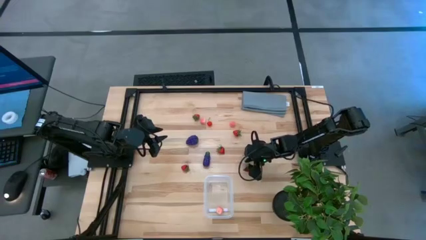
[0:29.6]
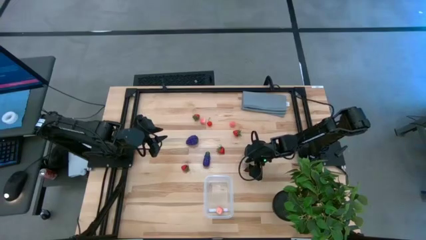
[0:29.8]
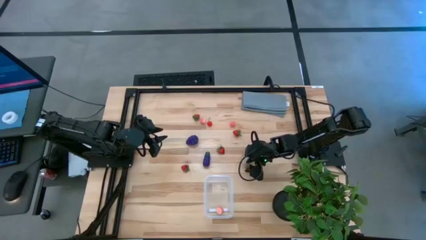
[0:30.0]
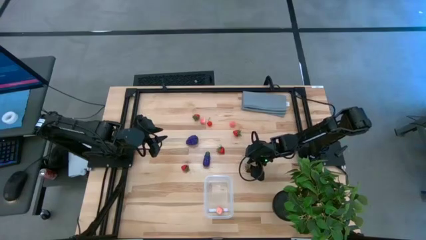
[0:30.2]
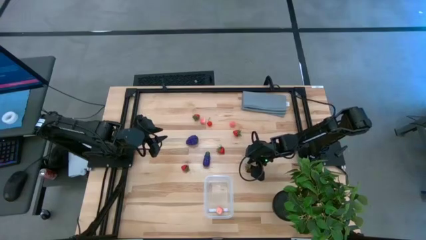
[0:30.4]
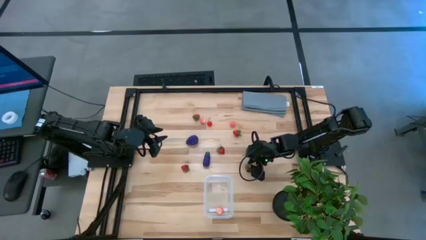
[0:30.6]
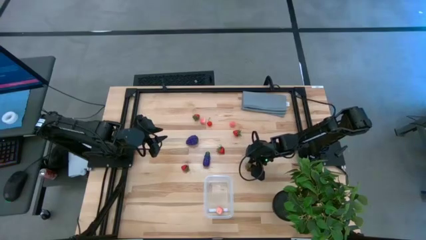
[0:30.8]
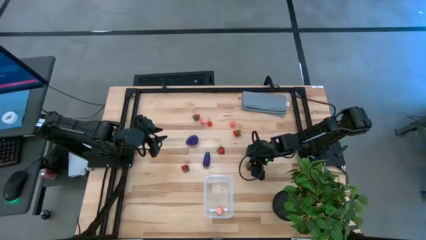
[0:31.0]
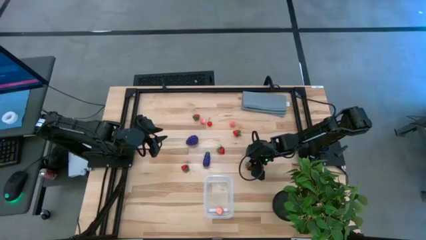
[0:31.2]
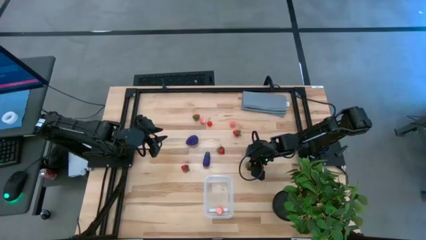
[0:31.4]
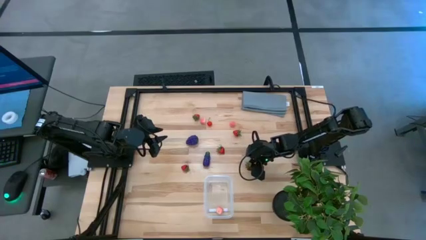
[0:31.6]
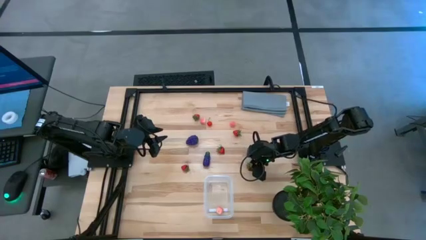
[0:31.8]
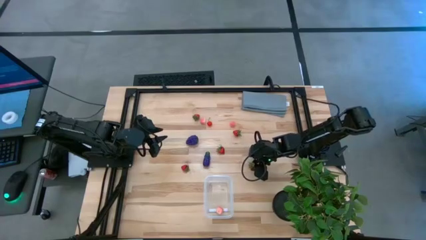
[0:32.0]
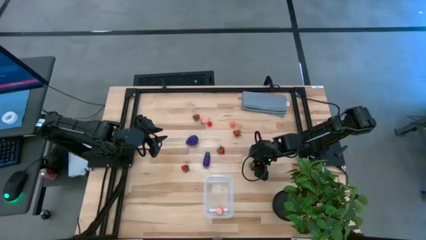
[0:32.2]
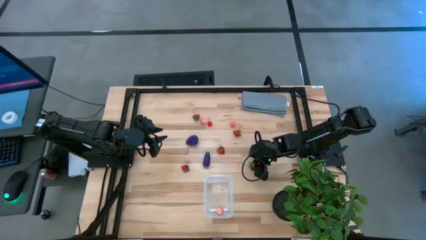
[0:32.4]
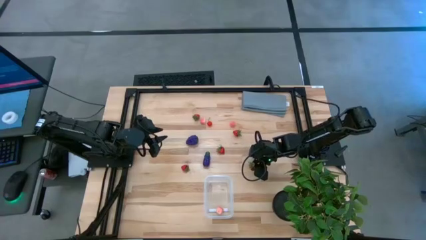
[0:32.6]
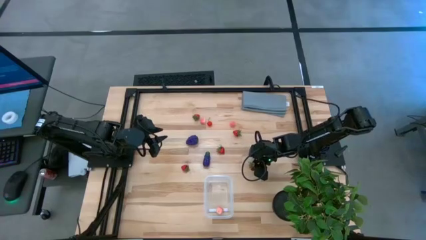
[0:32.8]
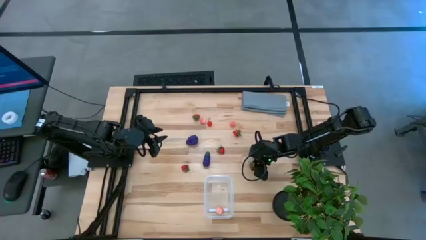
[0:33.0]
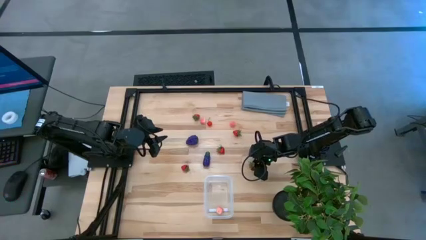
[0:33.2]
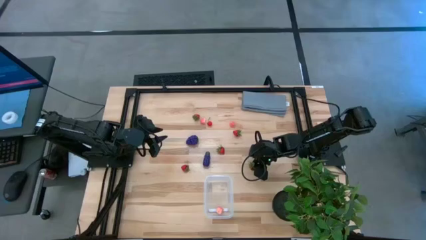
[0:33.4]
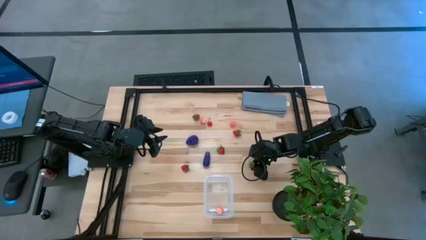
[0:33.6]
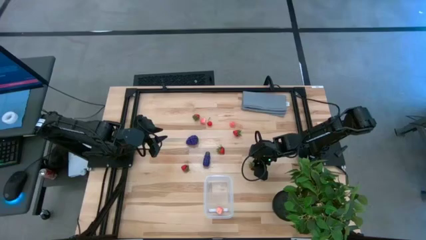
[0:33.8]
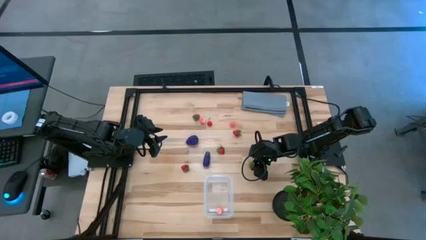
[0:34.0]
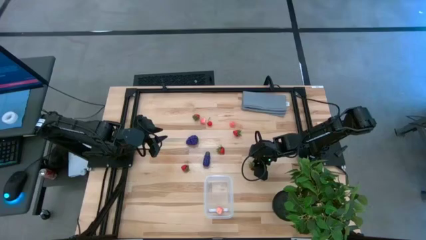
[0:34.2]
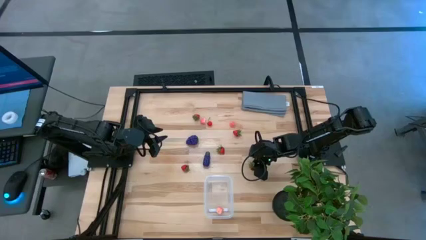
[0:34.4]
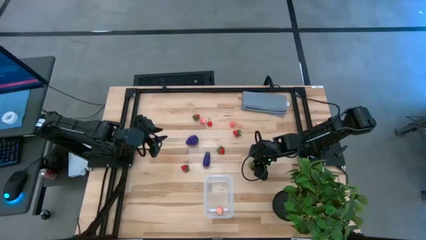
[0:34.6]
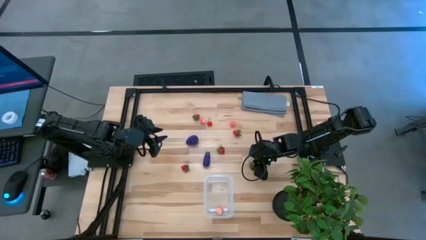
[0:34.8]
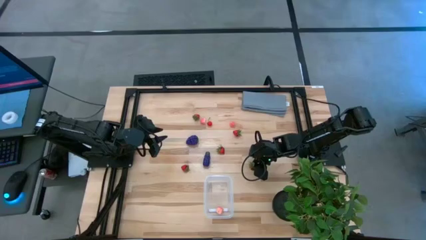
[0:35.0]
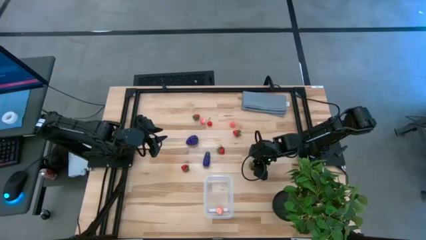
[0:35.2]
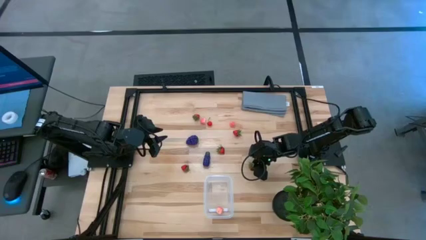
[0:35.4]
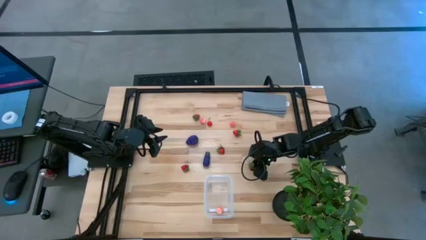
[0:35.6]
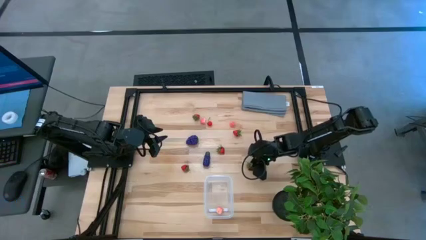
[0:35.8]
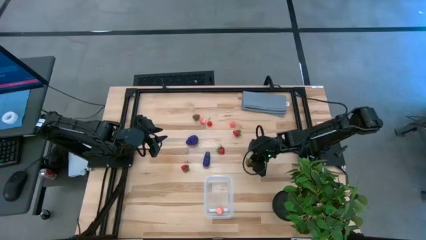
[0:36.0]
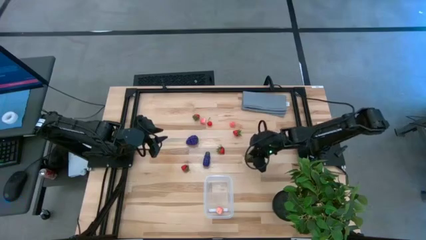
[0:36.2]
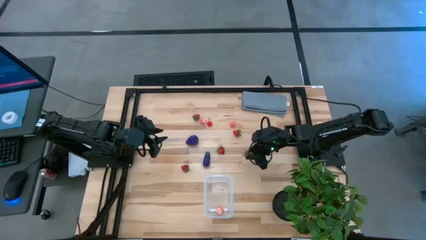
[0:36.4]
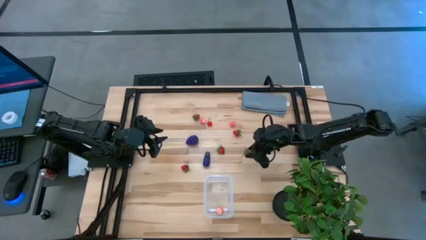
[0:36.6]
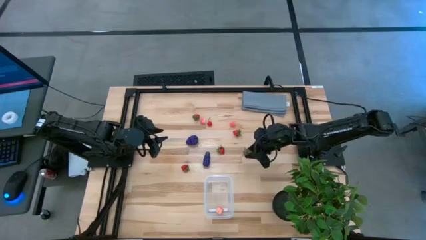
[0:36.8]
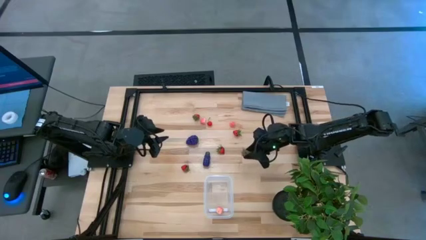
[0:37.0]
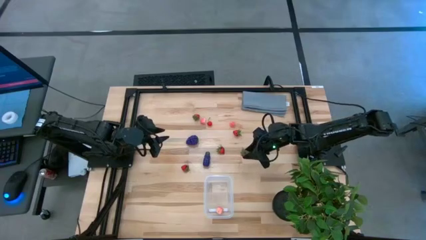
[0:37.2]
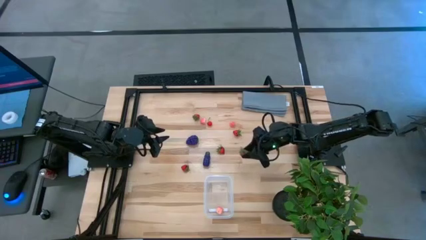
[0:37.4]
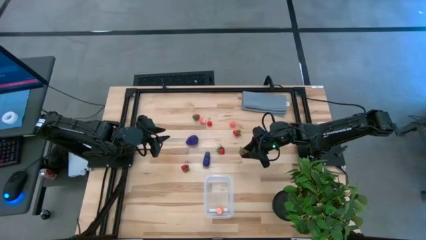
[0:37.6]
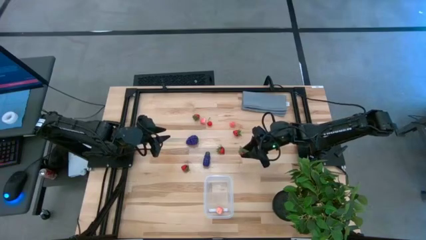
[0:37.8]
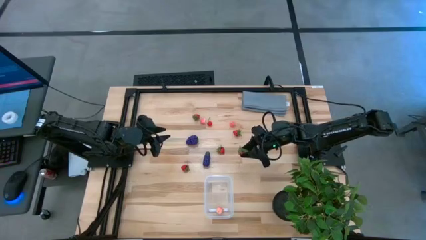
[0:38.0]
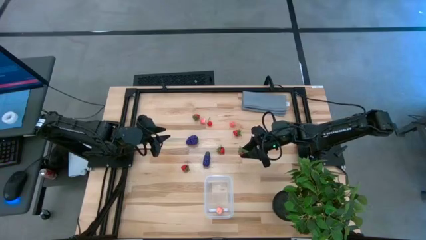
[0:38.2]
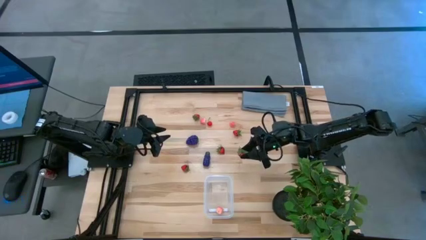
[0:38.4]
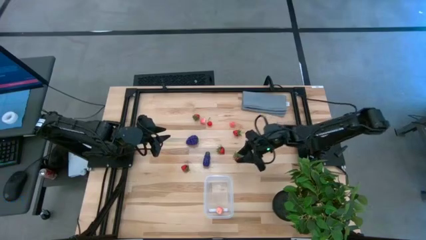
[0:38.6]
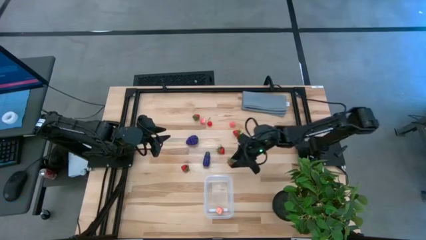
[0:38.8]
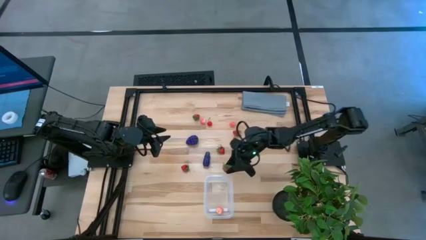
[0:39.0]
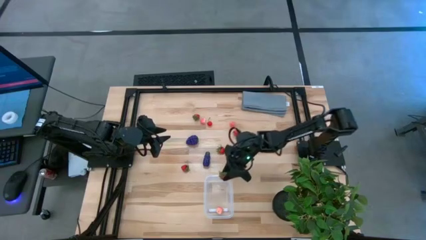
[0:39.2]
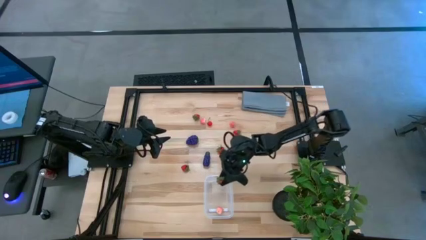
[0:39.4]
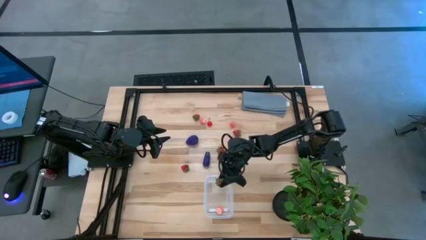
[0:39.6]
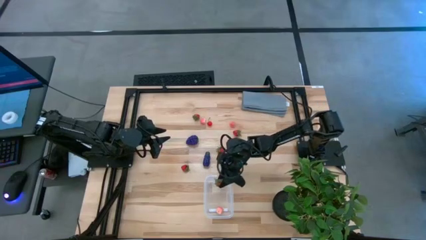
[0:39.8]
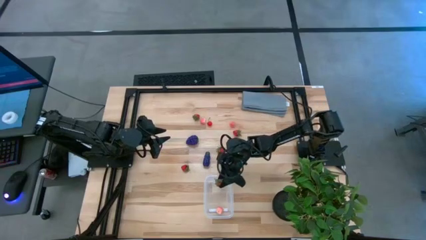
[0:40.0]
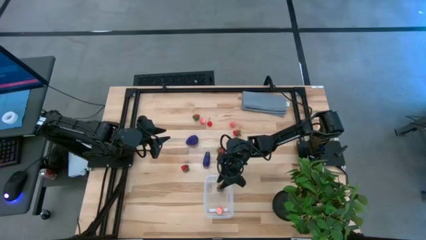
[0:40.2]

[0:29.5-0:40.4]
Task: Pick and placing Produce into tupperware
Put the red strawberry into the transparent bin

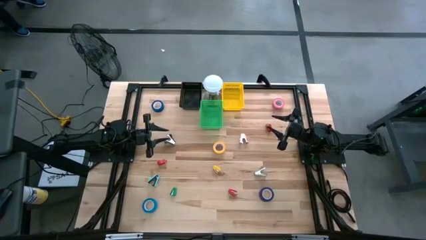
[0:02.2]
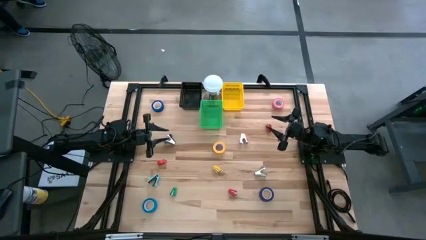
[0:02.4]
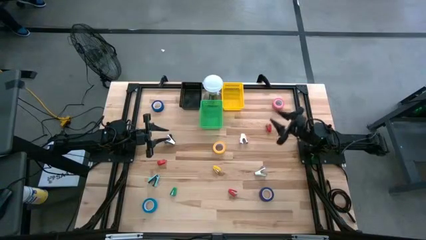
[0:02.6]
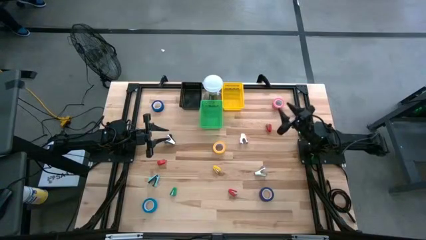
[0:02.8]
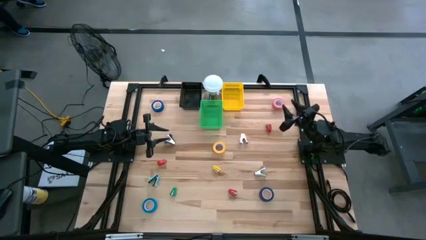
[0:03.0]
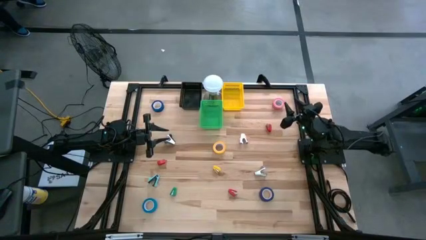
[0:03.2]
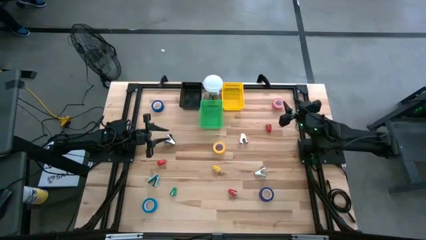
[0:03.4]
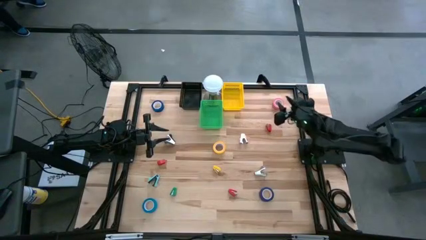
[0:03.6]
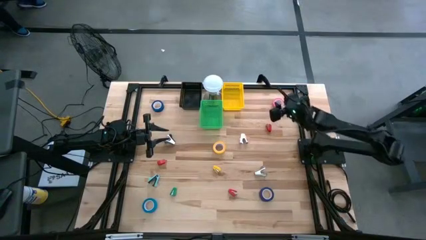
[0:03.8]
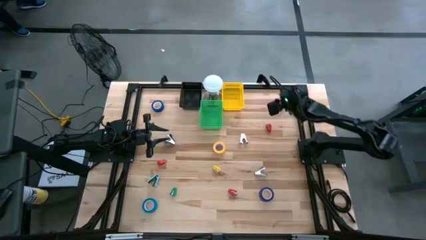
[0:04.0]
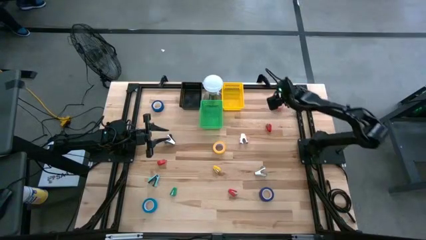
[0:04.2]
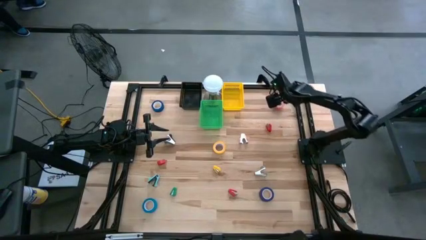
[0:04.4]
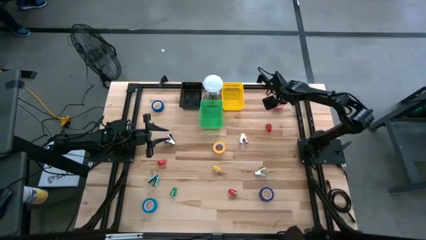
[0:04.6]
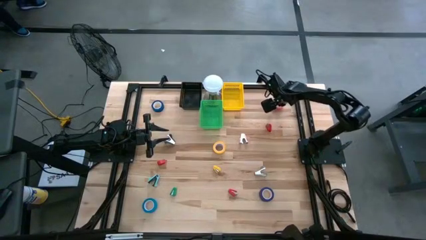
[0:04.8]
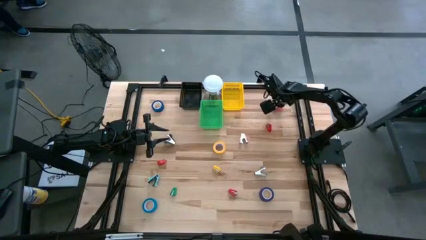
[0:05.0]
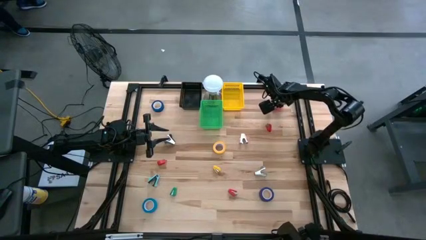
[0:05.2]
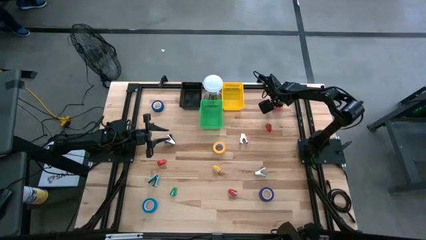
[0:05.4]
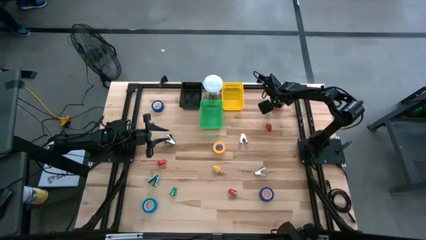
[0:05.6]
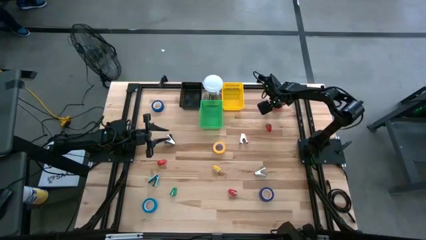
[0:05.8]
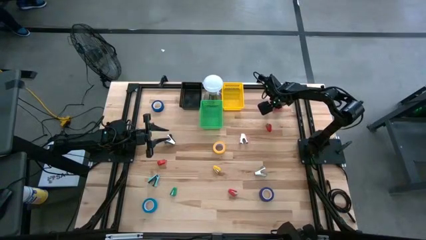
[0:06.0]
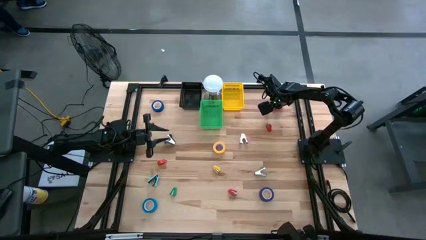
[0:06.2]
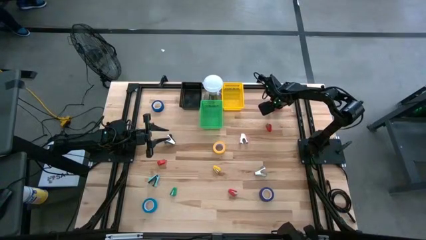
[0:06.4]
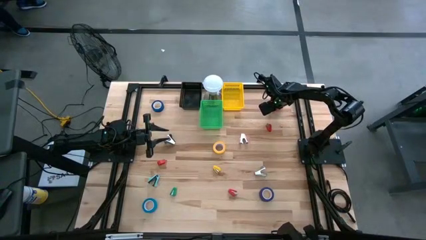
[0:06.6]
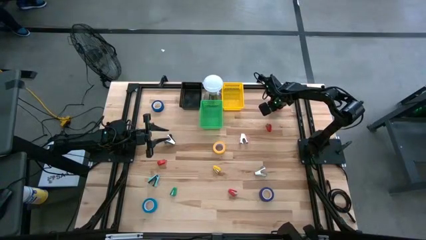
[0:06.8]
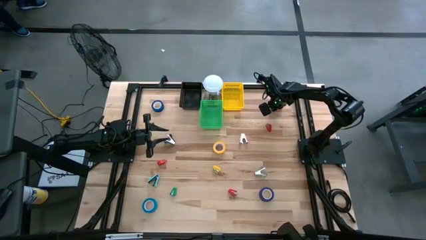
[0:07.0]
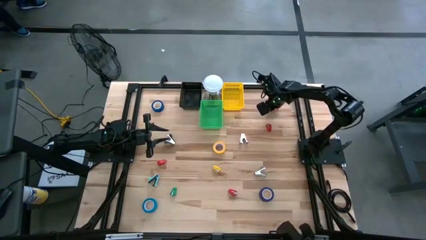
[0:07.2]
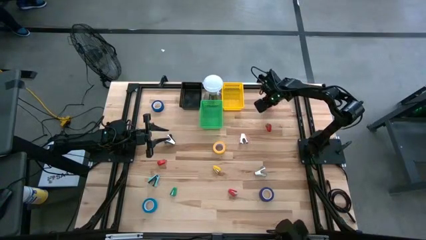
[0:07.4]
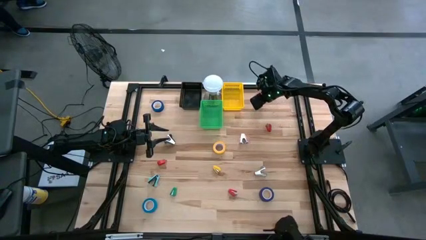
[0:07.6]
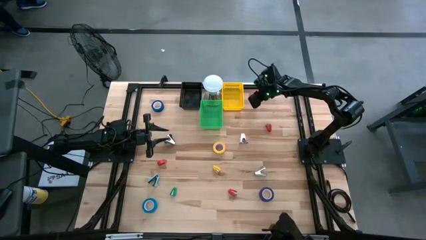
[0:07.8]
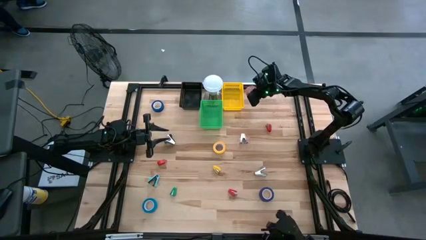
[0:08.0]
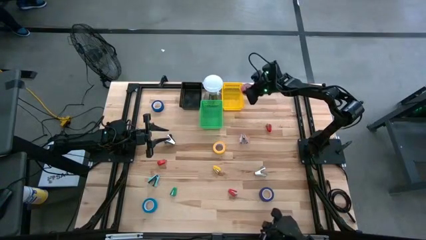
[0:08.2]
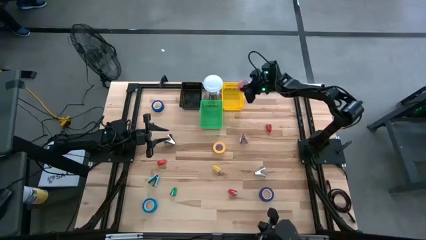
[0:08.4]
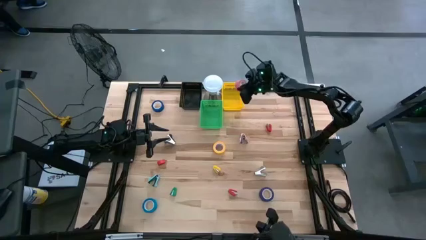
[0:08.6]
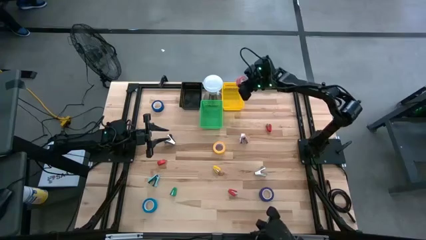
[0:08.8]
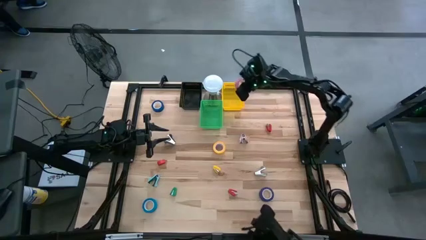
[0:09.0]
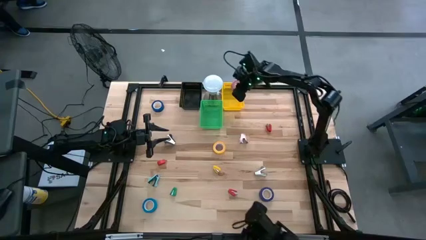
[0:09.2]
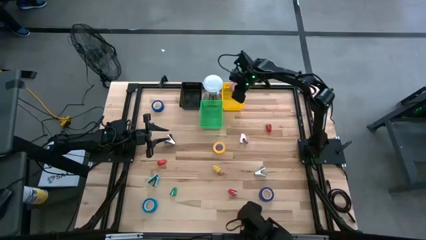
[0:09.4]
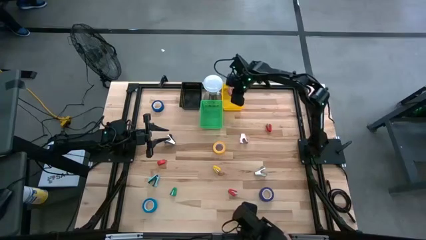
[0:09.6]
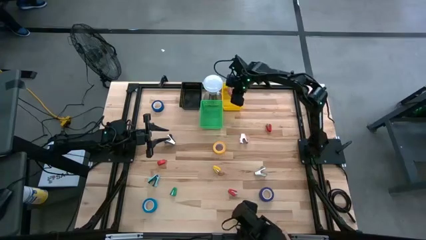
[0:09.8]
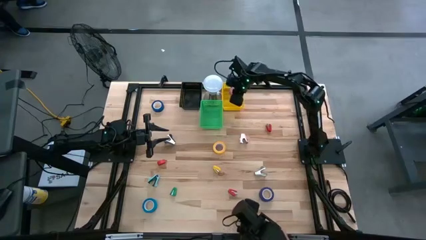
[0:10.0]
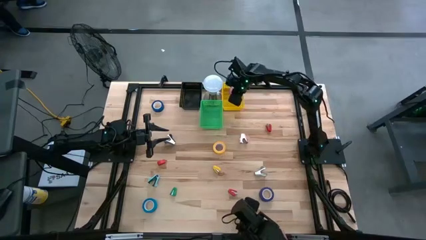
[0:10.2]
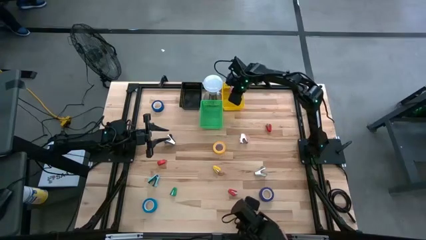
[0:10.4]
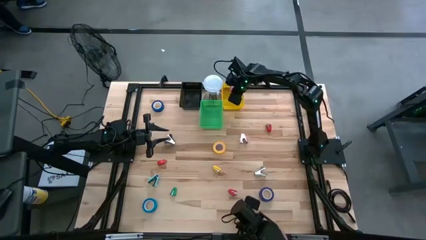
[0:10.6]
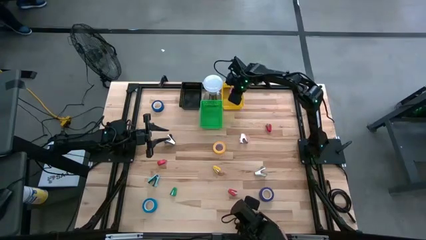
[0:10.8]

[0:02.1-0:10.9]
Task: Pick and place Stapler, Stapler remover, tape
Put the pink tape into the yellow bin
